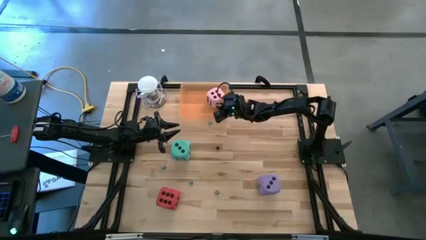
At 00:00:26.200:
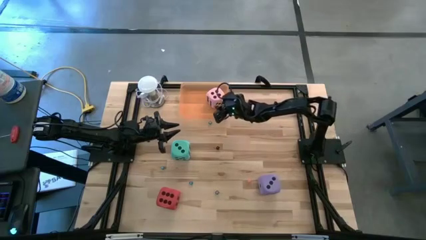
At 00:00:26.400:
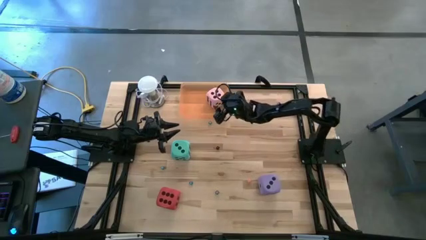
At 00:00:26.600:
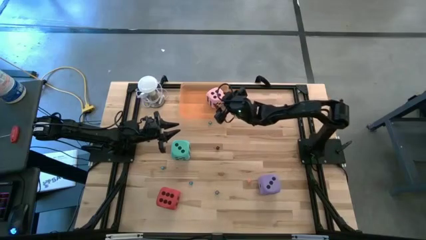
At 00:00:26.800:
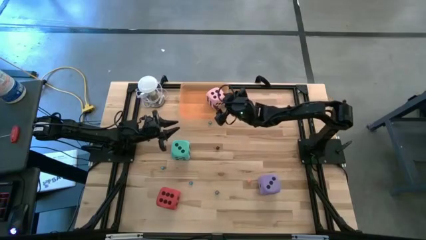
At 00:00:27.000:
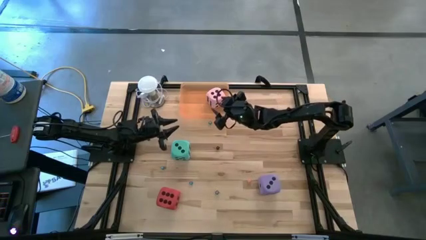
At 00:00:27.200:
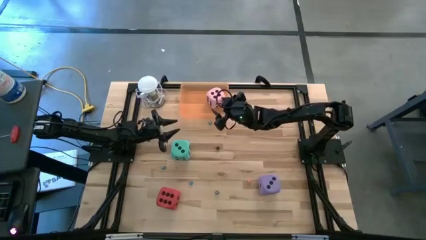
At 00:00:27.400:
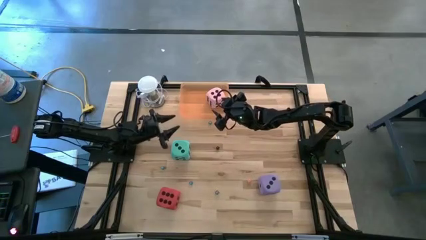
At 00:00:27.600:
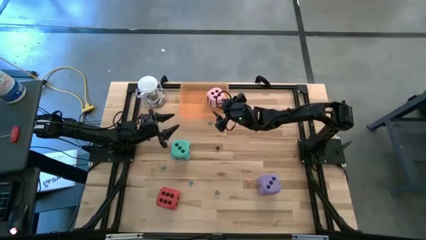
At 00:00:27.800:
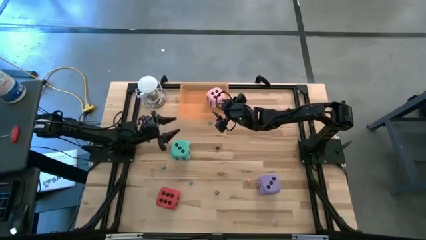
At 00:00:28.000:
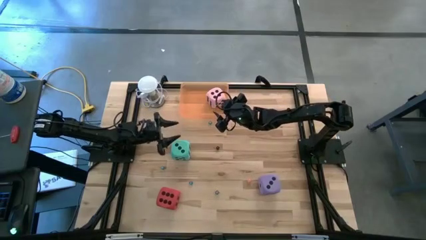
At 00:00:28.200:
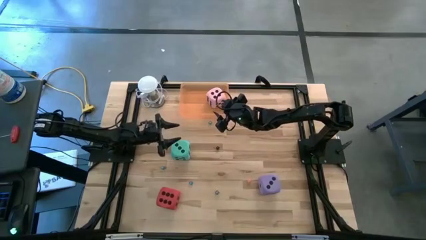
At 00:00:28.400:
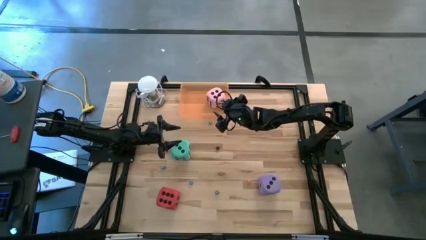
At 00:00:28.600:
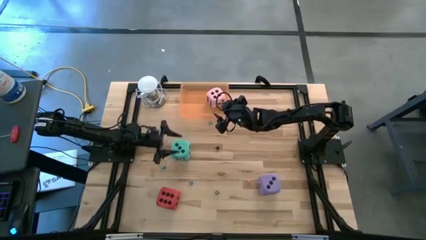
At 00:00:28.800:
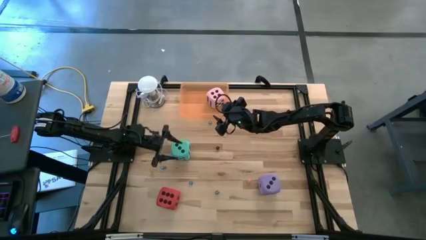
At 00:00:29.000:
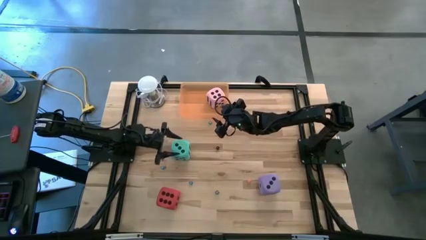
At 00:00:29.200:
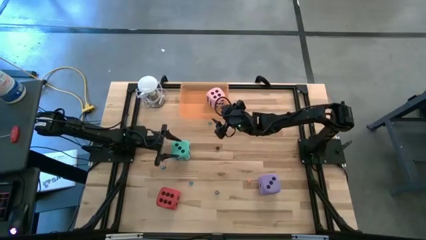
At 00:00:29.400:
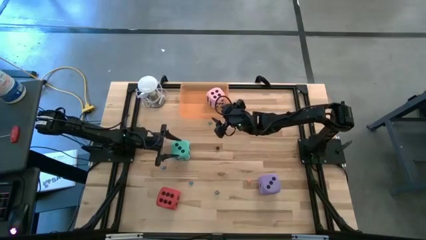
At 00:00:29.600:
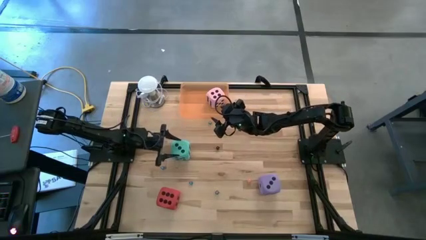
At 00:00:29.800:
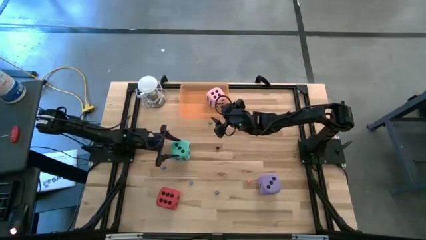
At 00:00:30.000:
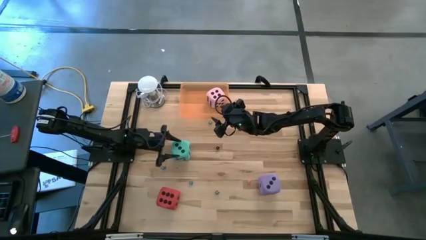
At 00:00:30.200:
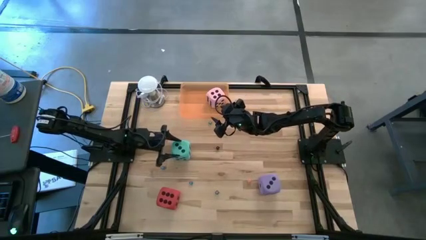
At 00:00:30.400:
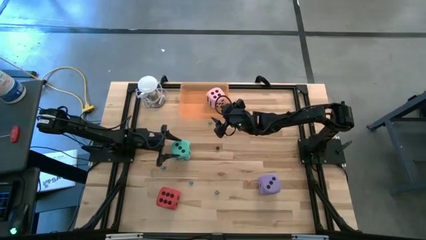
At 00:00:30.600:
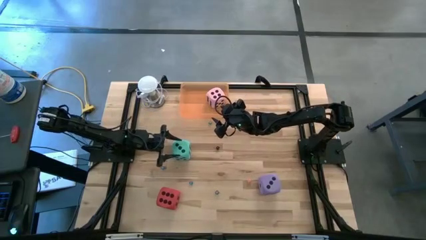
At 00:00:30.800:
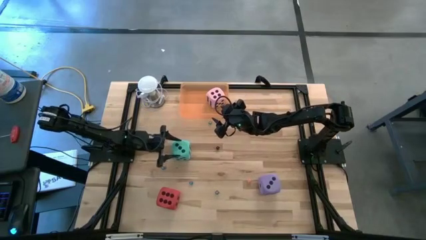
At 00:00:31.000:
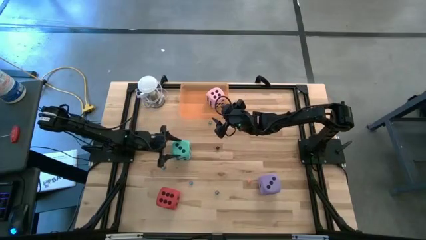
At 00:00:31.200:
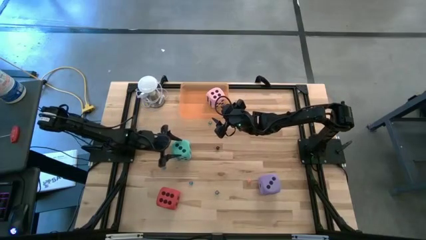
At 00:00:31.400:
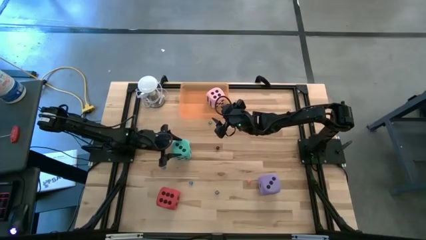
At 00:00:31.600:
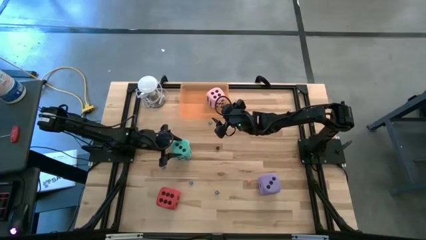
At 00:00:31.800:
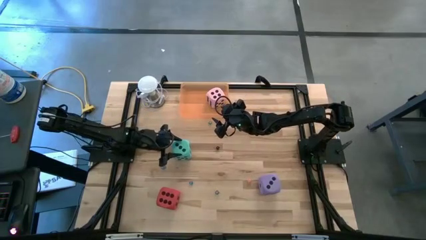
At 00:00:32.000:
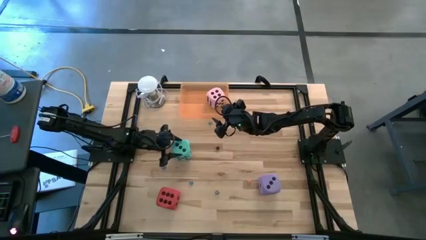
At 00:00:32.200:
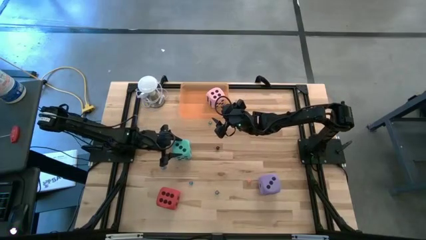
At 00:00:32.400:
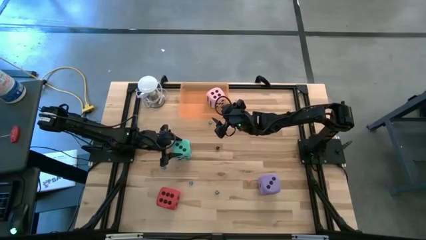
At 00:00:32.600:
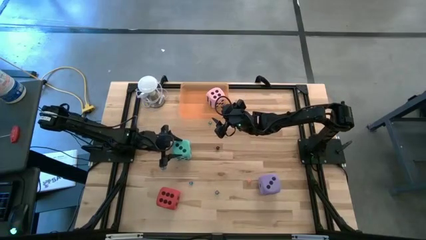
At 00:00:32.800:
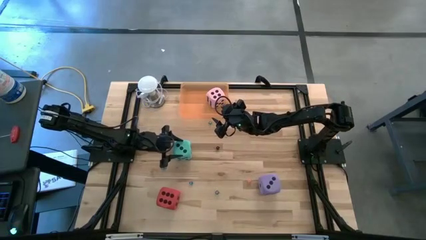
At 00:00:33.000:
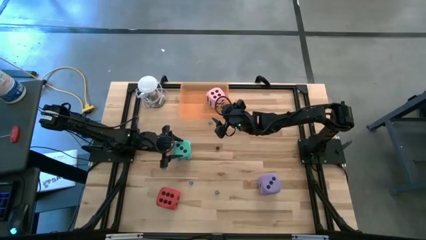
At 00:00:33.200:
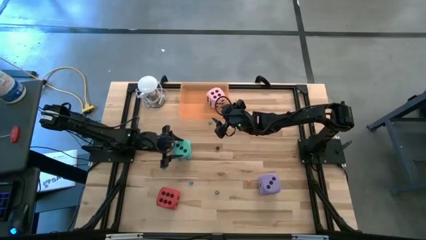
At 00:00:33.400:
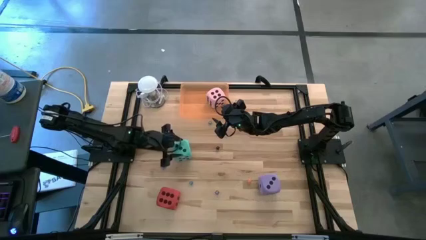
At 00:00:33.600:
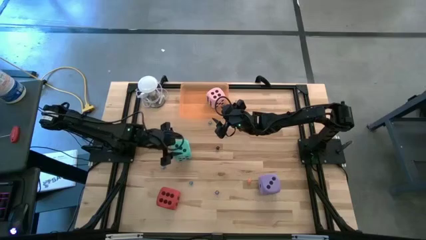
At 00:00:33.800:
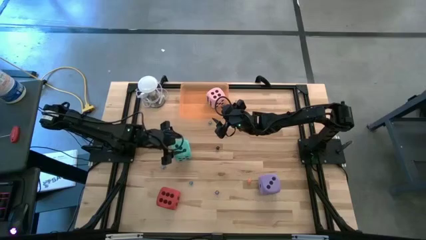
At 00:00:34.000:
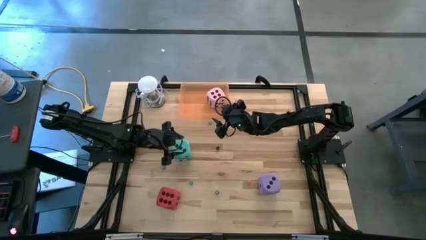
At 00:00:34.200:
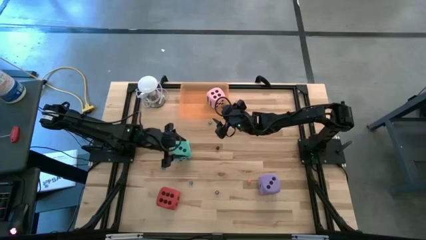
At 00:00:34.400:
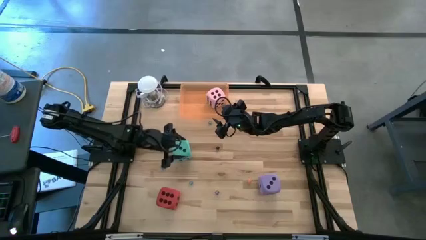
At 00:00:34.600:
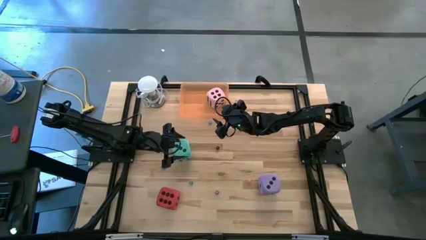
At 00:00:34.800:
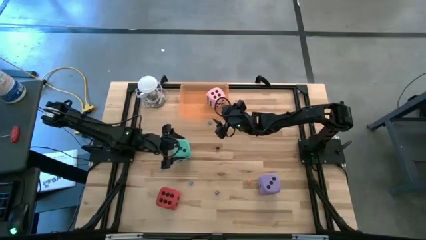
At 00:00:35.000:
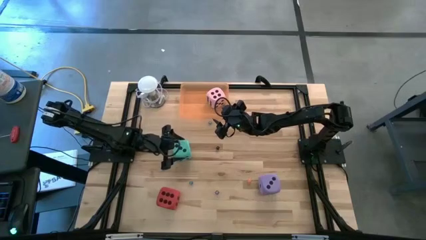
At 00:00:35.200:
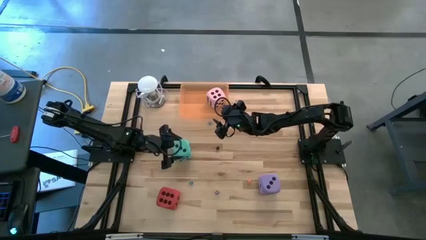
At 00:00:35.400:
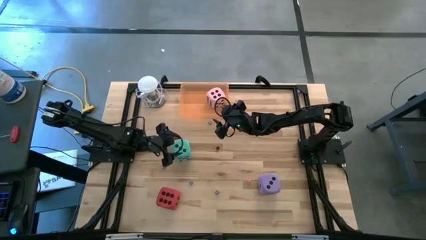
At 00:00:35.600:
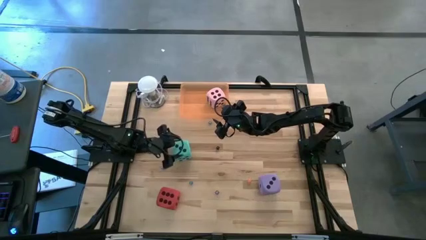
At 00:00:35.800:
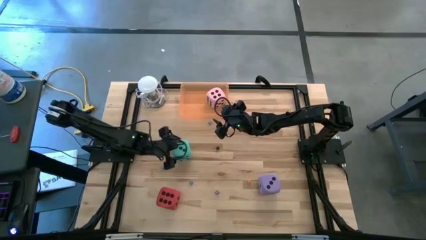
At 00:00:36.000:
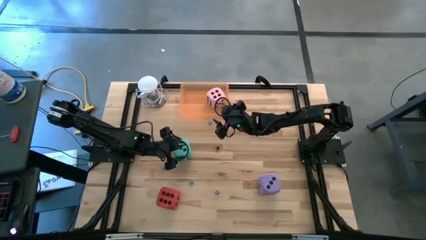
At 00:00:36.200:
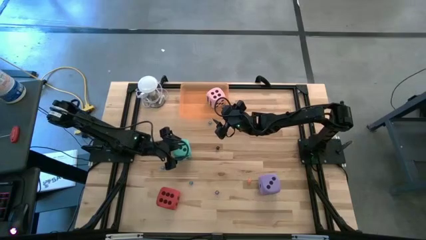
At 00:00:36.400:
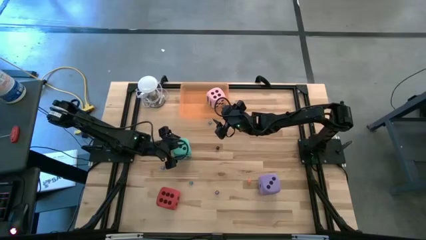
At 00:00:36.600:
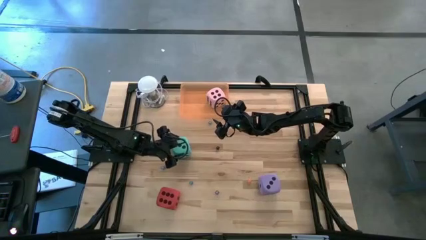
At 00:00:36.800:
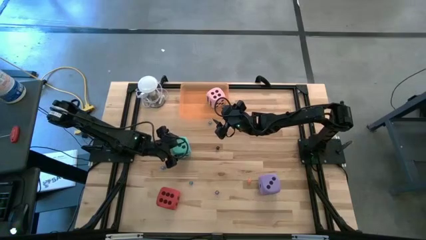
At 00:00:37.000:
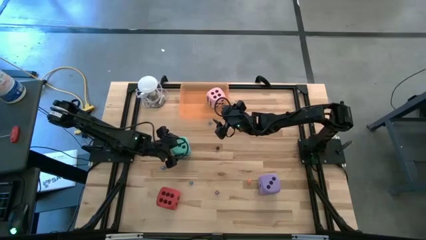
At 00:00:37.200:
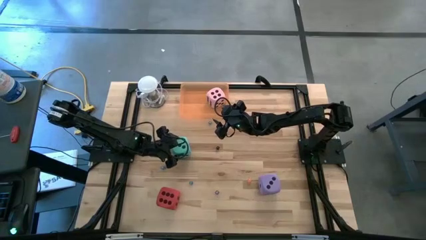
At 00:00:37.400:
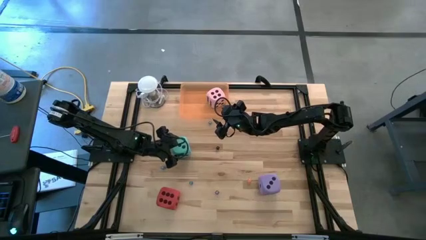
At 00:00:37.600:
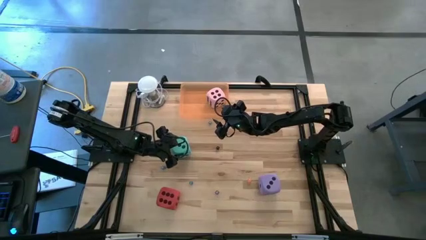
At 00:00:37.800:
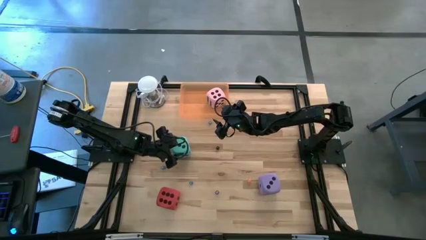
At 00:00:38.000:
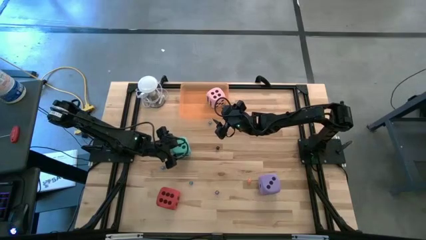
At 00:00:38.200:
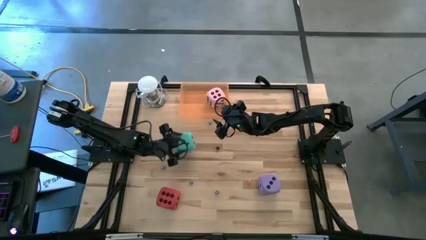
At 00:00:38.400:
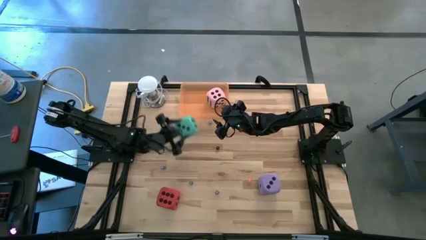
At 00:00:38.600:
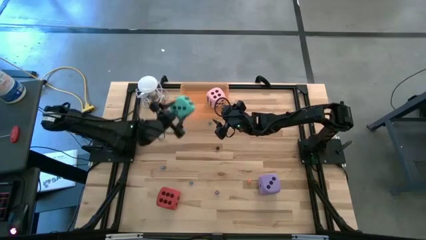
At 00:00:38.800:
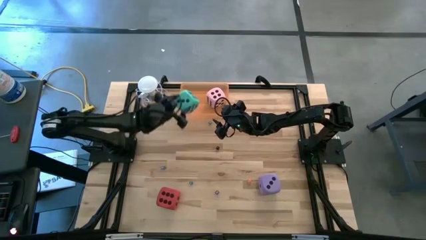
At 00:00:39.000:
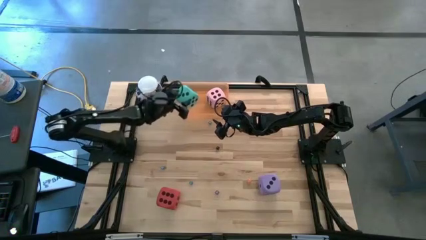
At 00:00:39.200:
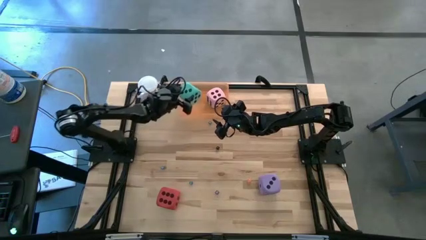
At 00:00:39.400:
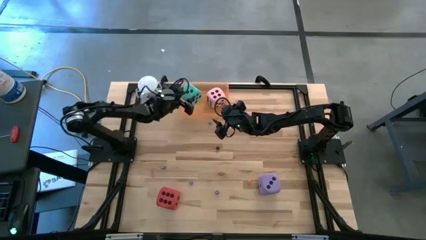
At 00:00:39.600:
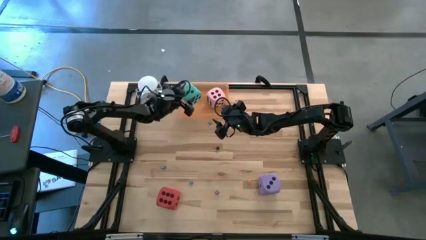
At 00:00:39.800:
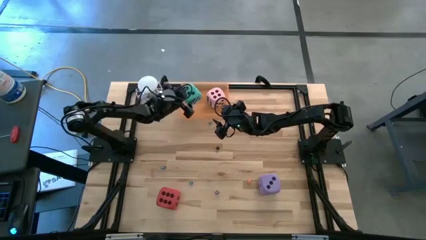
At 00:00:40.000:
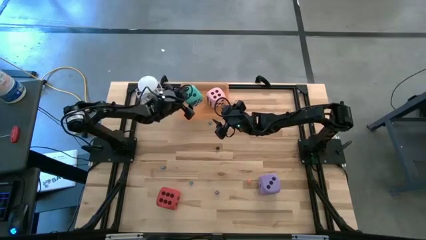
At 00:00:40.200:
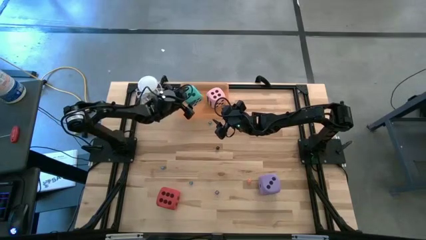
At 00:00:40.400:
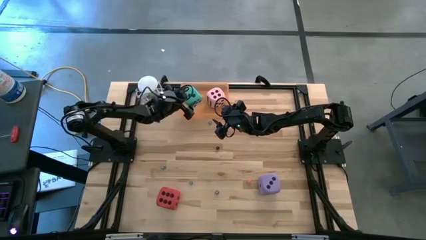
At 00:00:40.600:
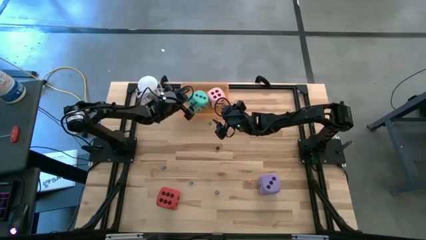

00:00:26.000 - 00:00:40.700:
Task: Pick & Place Dice
Put the large light blue die into the bin
